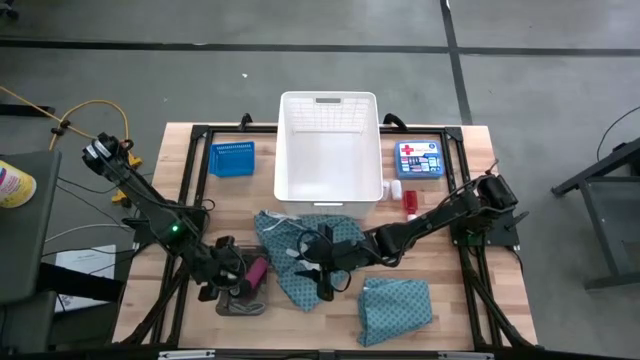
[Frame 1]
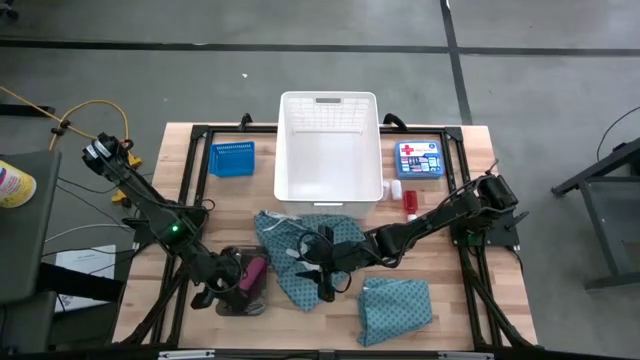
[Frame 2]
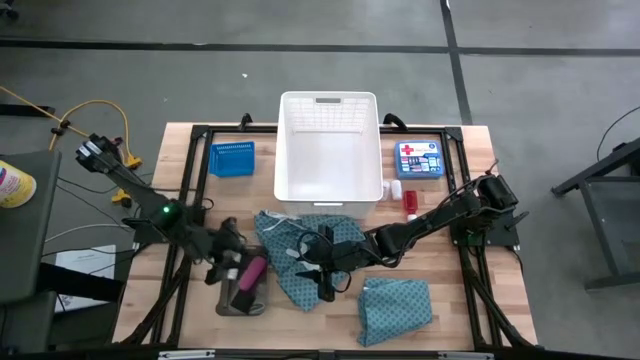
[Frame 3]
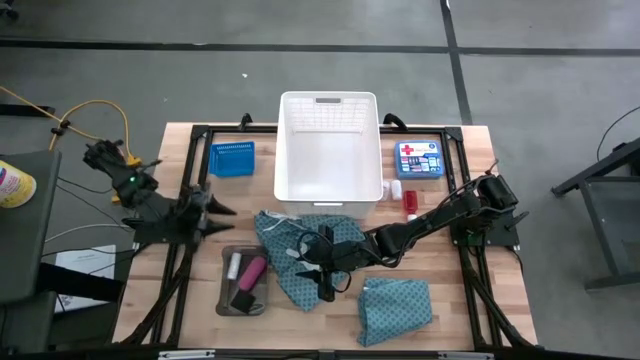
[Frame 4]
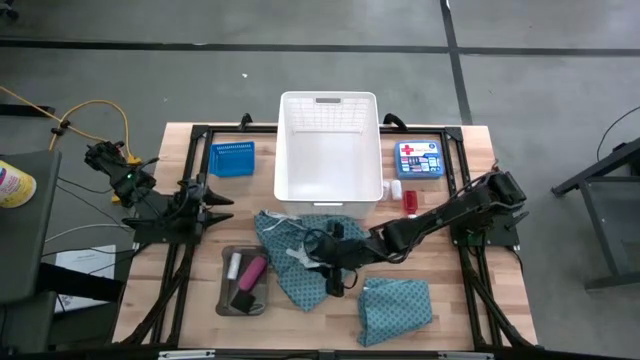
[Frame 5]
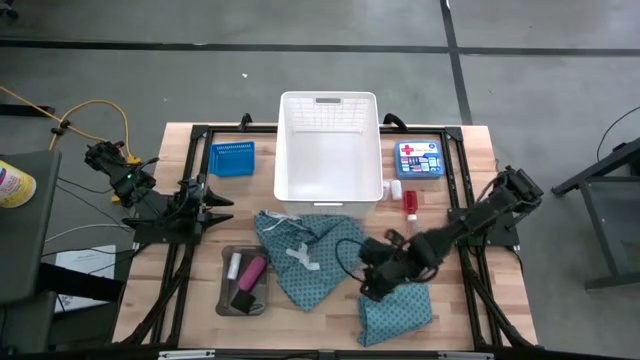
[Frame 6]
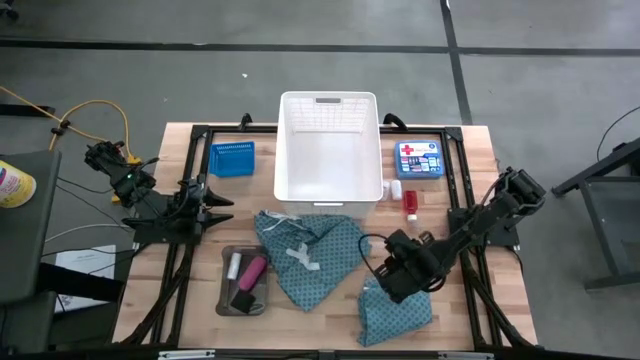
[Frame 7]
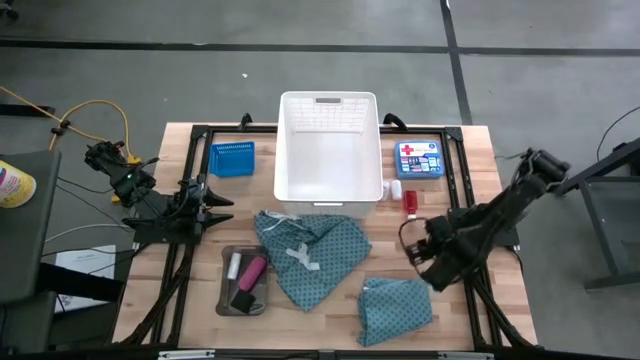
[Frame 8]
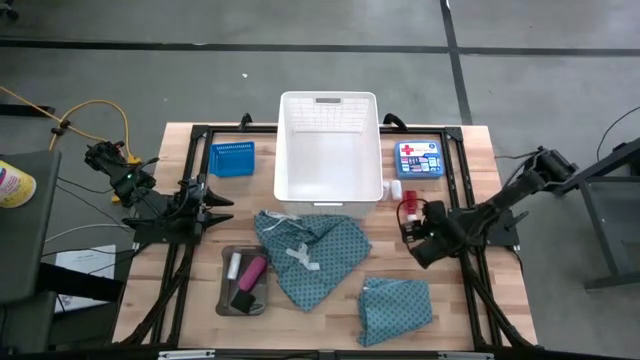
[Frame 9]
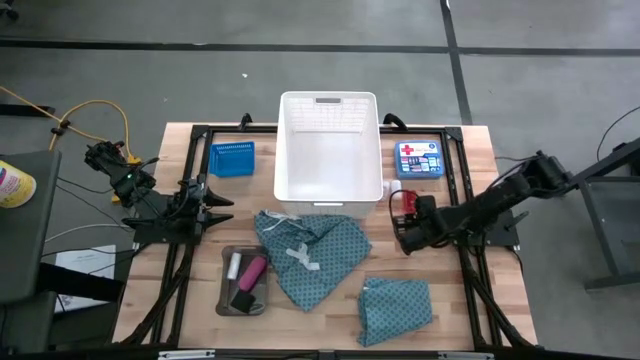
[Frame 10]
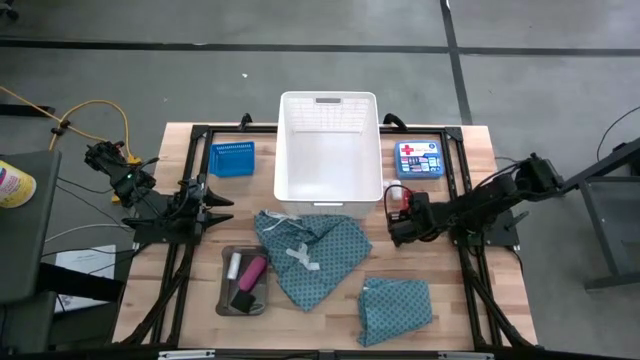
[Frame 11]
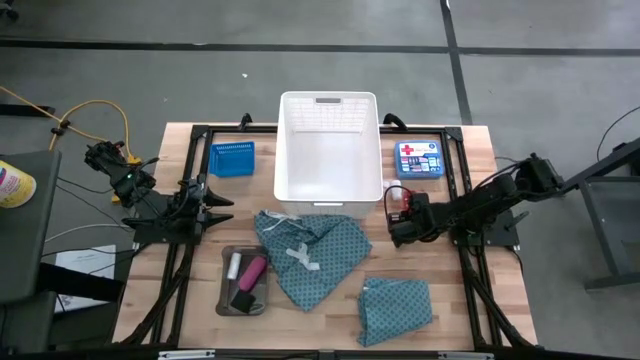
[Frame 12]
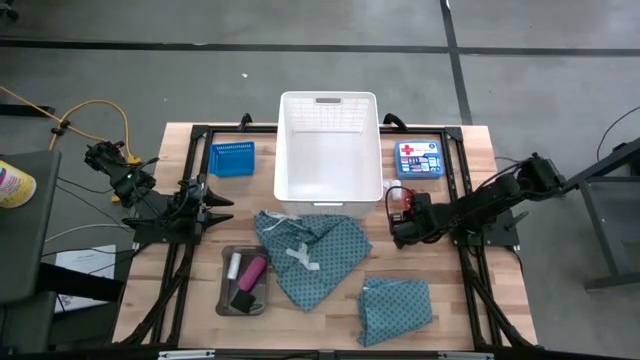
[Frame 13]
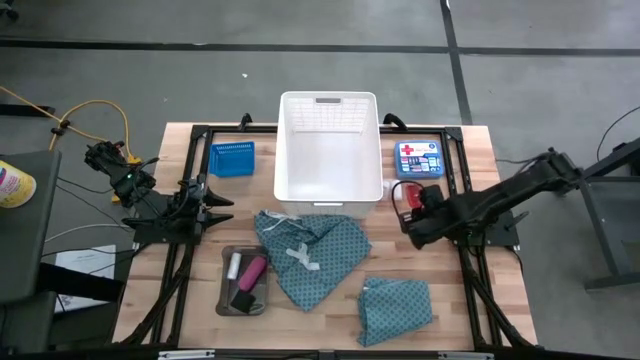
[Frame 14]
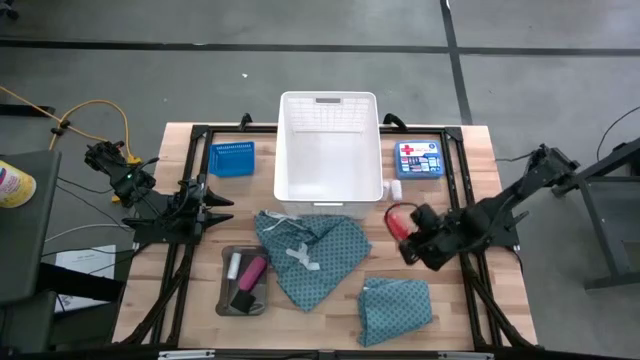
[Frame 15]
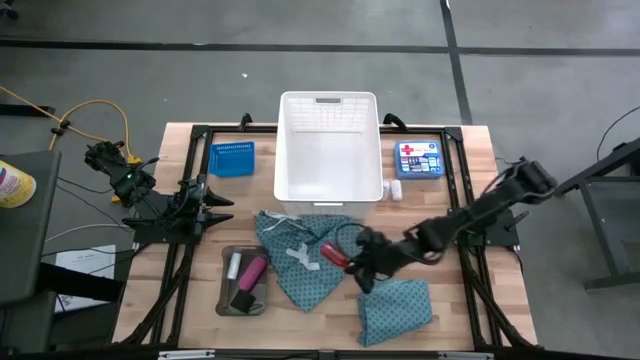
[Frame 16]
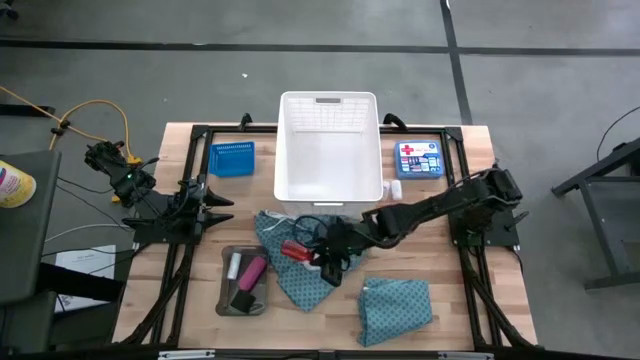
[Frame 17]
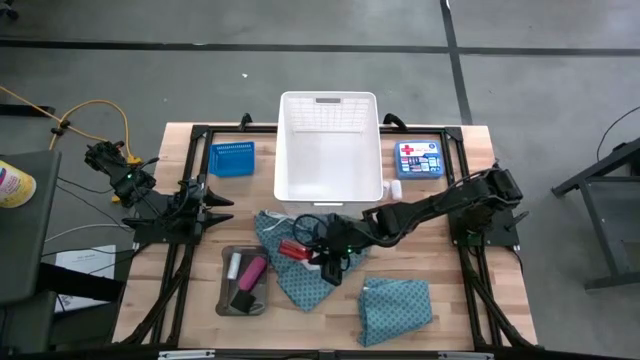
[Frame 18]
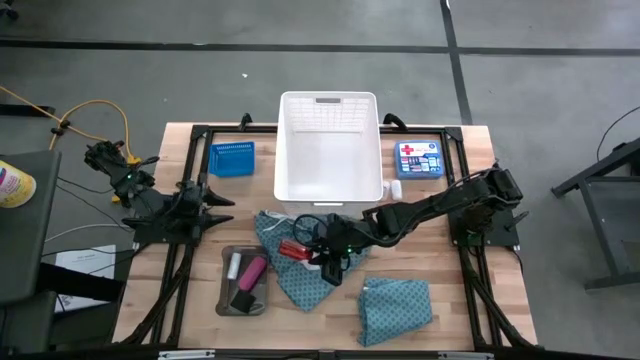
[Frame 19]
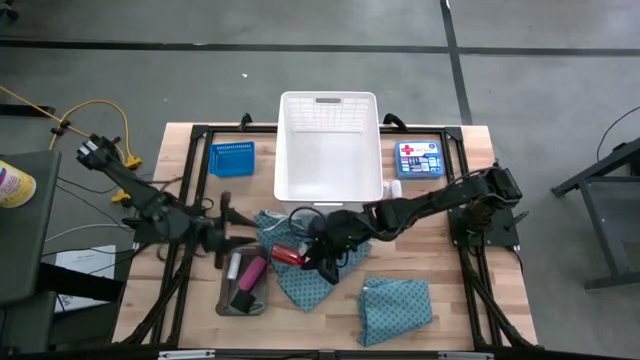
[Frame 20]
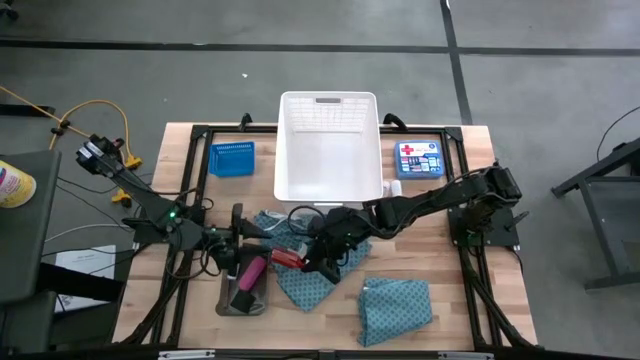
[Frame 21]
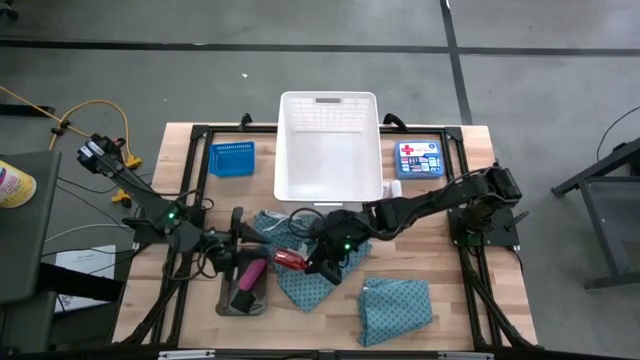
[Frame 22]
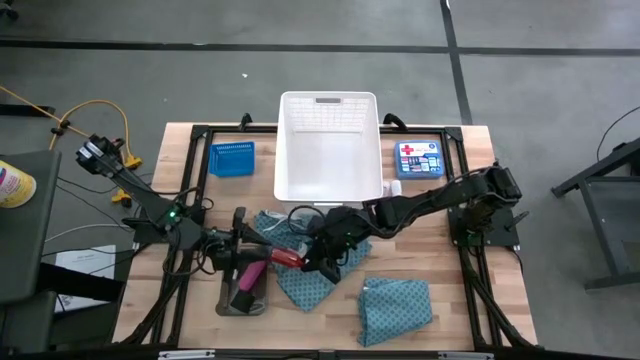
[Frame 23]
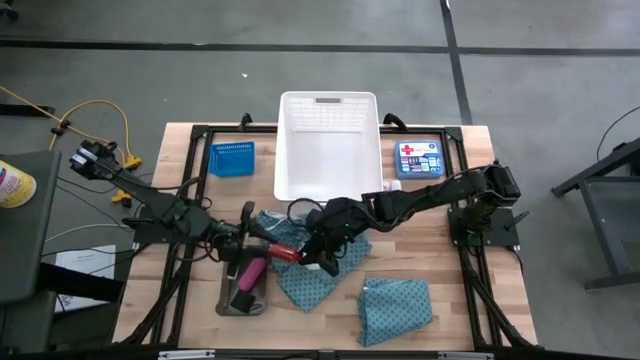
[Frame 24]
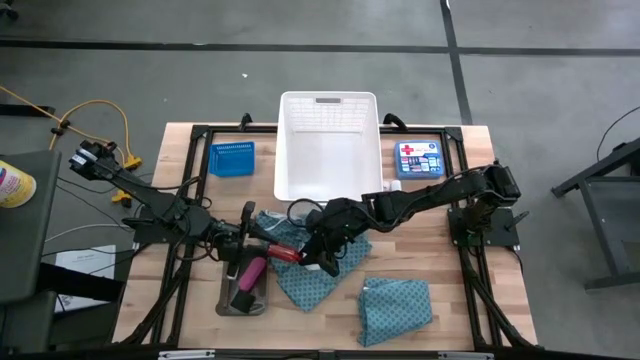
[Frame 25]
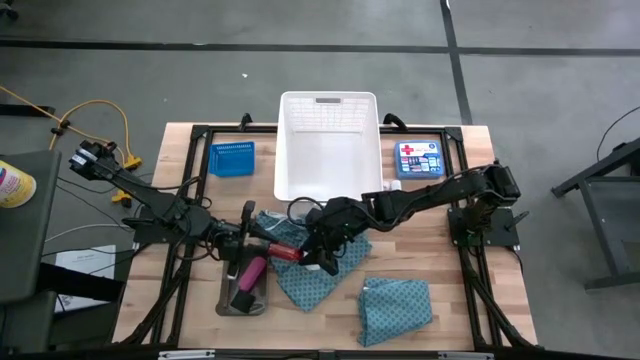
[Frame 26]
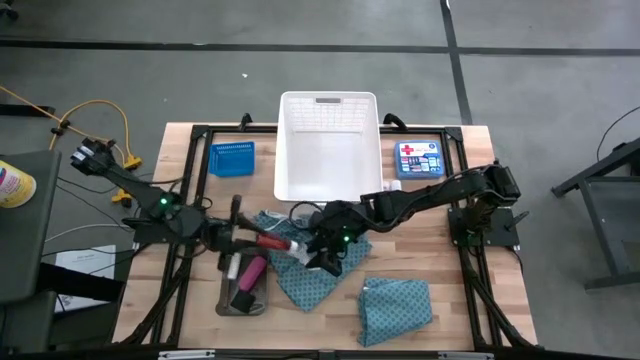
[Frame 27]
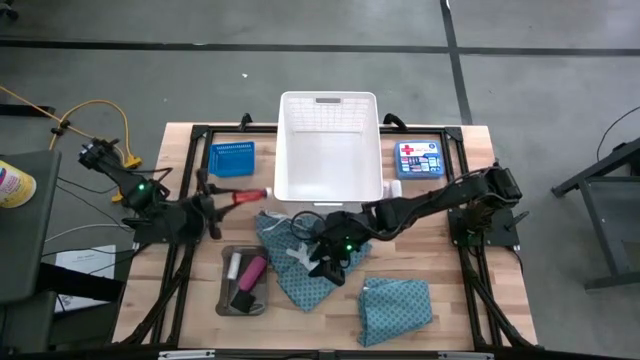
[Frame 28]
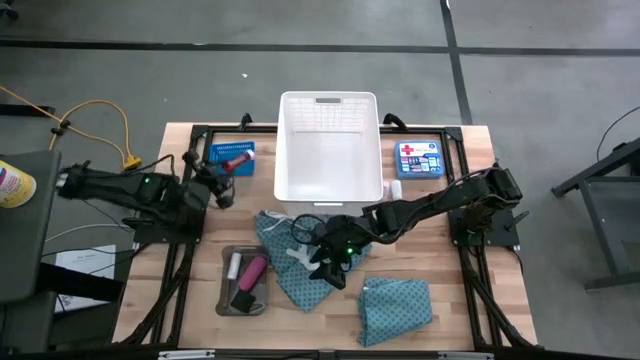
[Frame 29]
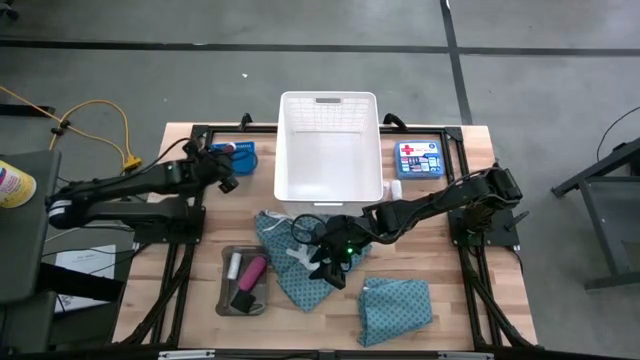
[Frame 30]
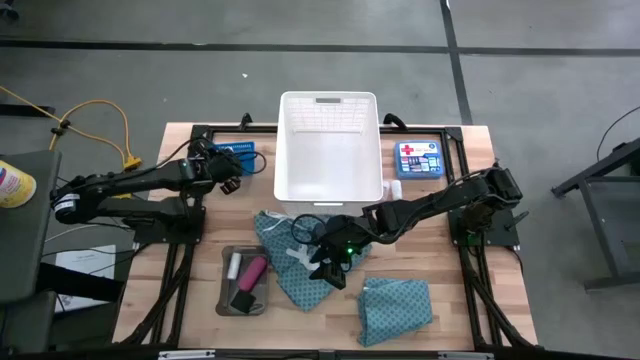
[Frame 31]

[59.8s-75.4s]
Task: Pick & place medical supplies in basket/bin
Put the orange bottle into the blue bin

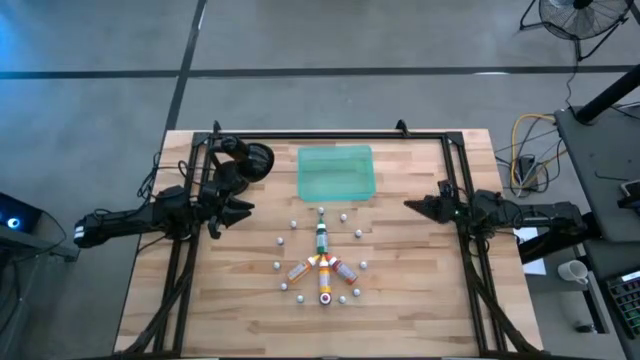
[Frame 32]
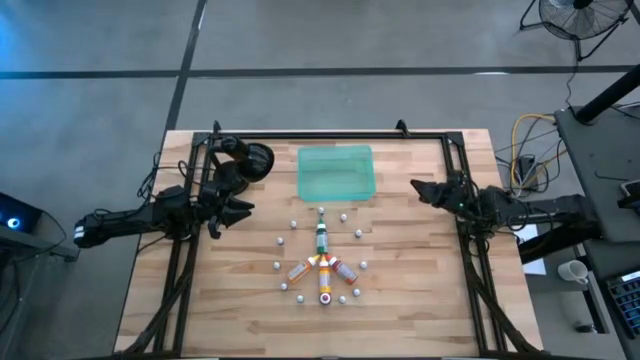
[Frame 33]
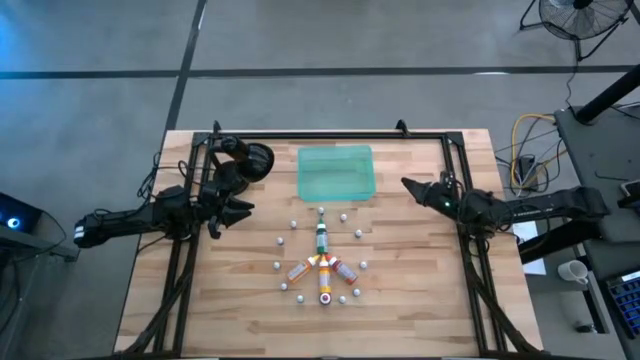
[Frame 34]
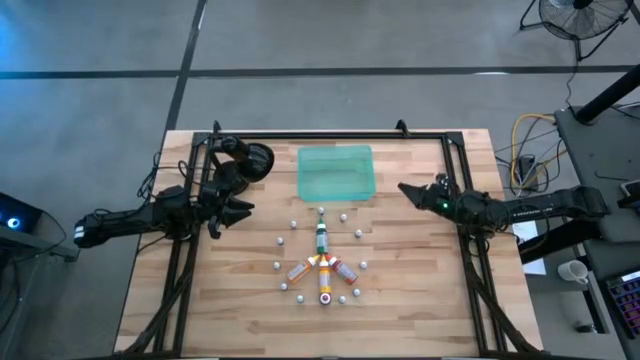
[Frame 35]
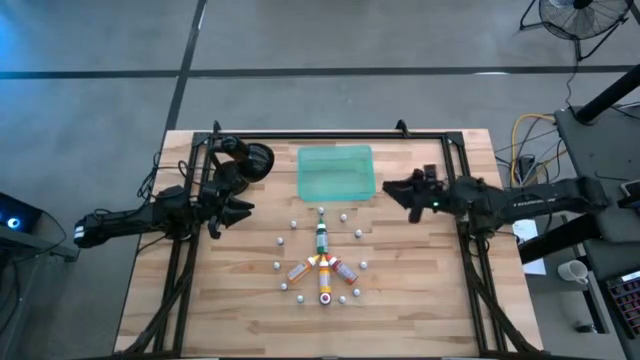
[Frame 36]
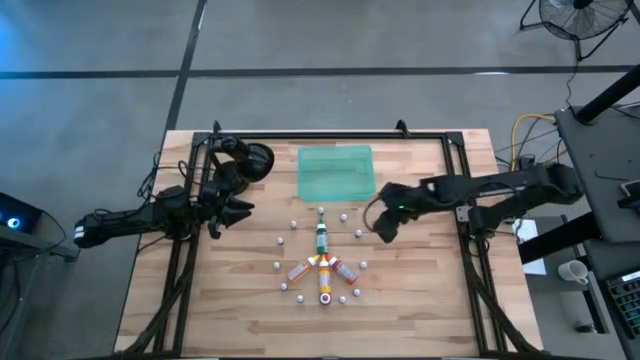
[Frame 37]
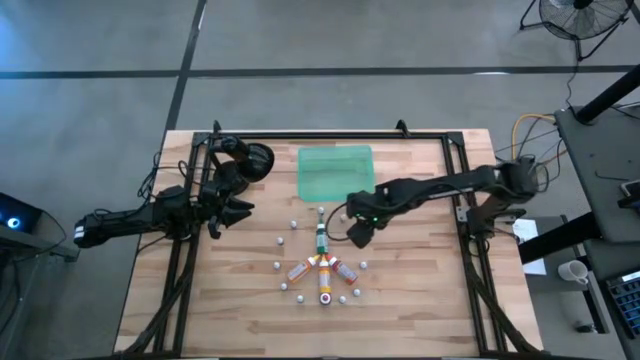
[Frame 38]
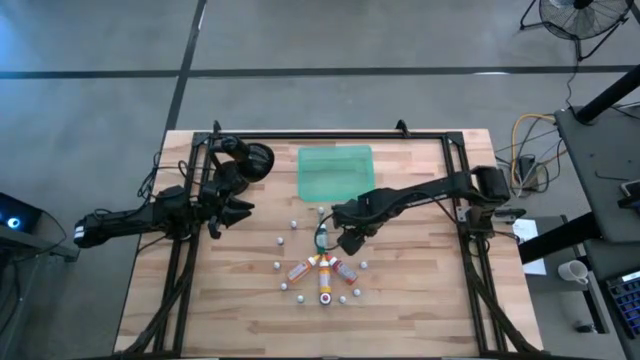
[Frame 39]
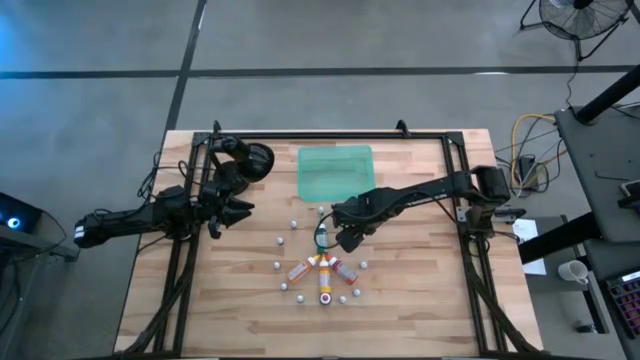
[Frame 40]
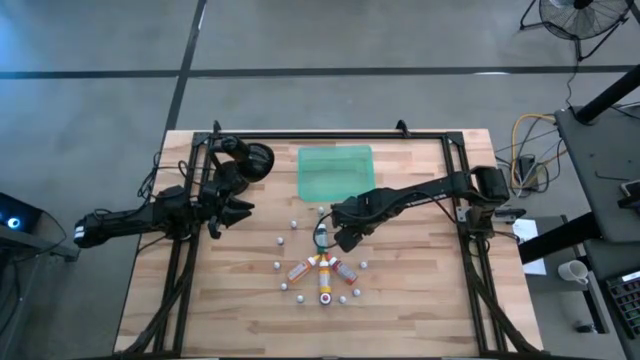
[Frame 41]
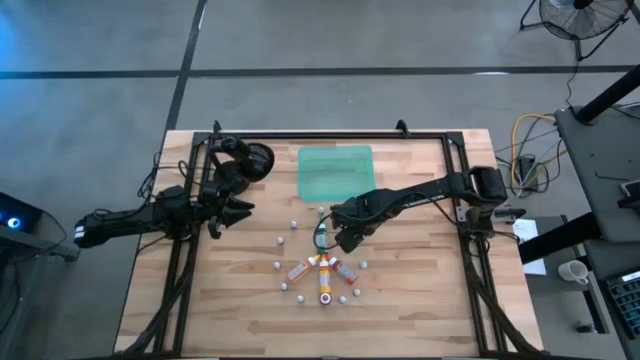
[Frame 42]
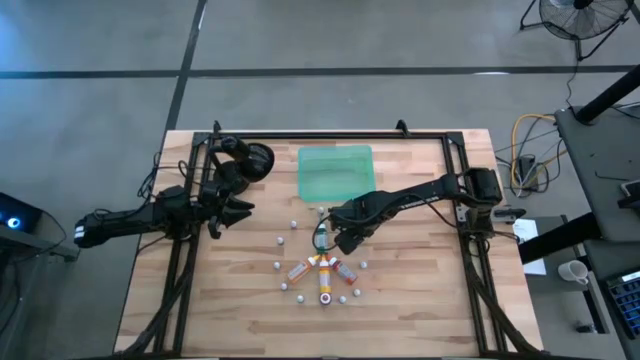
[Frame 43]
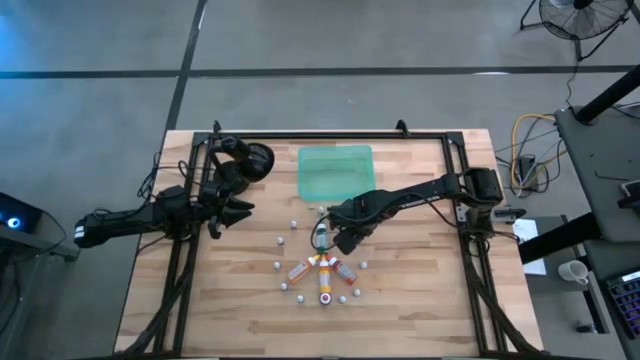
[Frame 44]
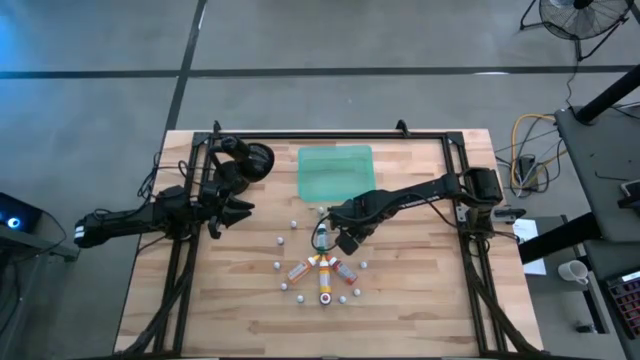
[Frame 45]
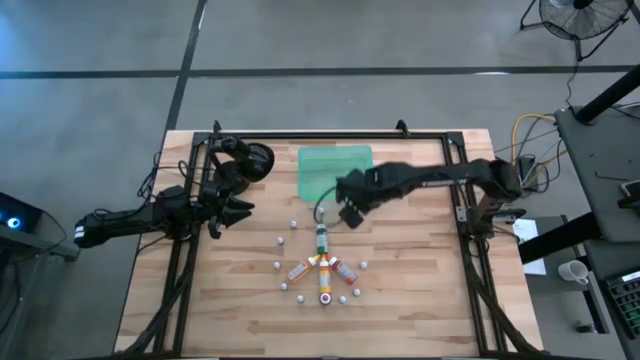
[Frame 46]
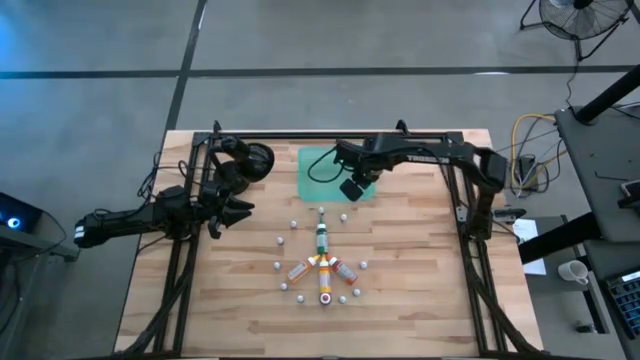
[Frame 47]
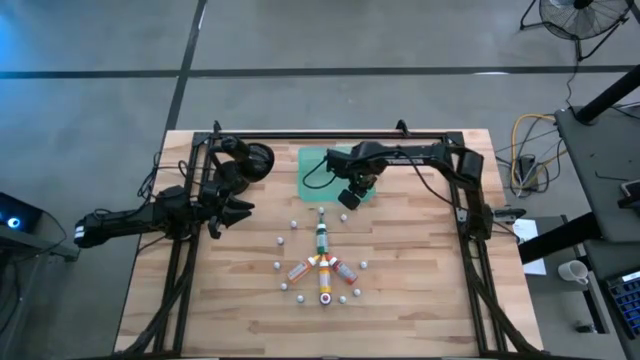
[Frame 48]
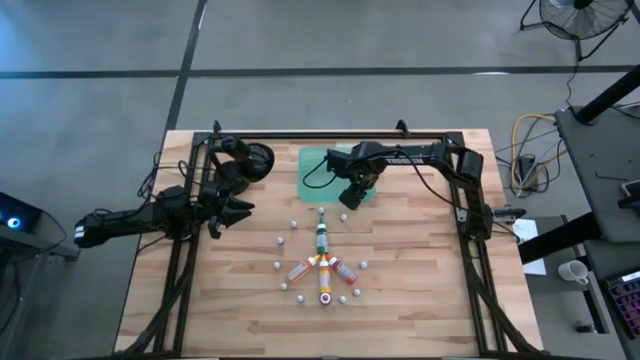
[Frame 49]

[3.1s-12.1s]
Task: Pick & Place food coloring
Put the top right small green food coloring bottle into the bin
